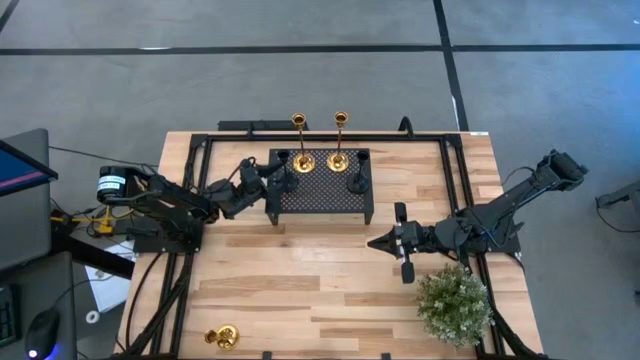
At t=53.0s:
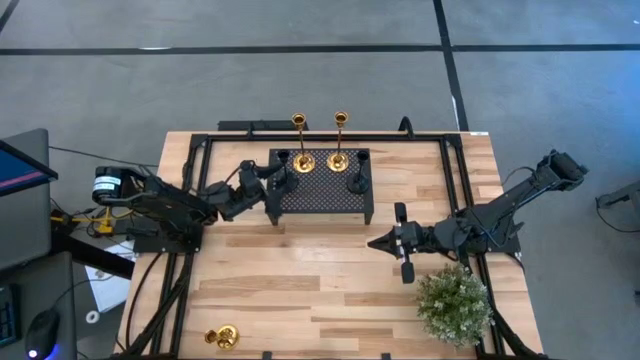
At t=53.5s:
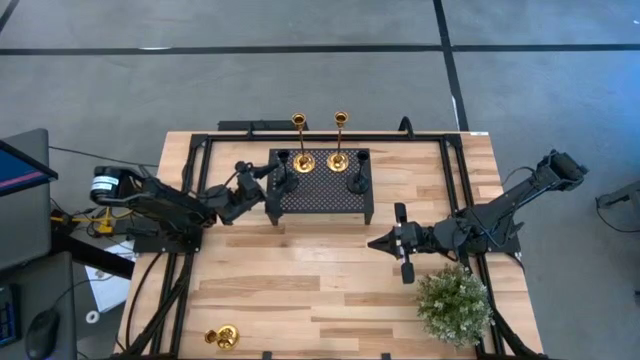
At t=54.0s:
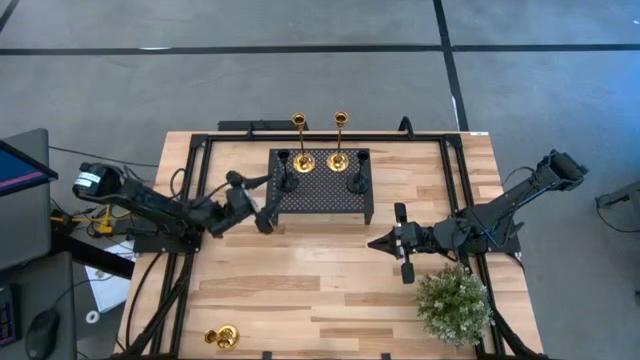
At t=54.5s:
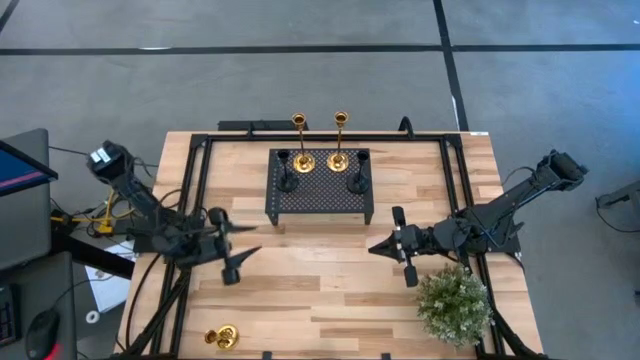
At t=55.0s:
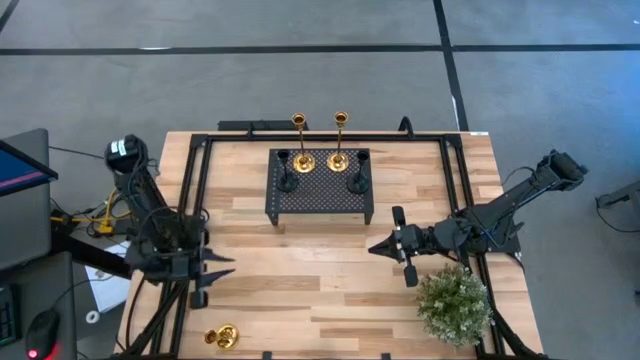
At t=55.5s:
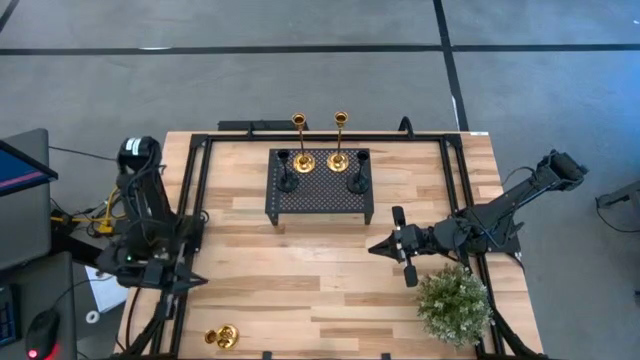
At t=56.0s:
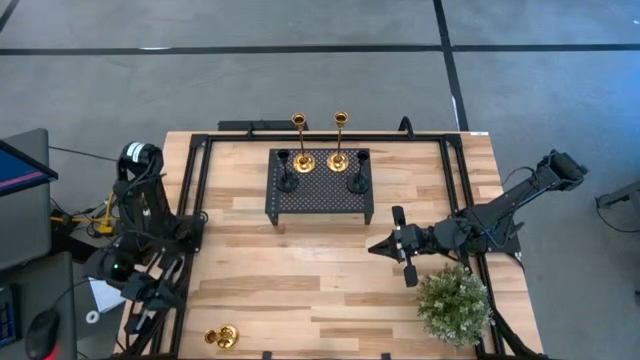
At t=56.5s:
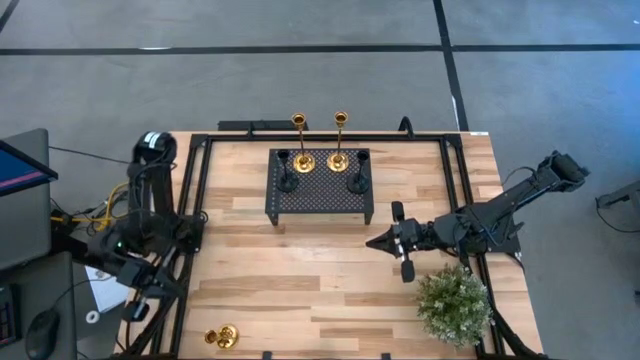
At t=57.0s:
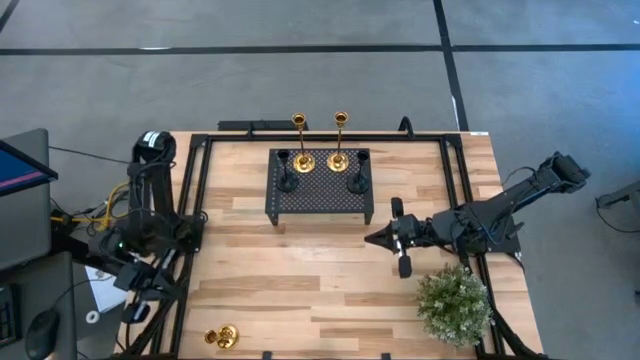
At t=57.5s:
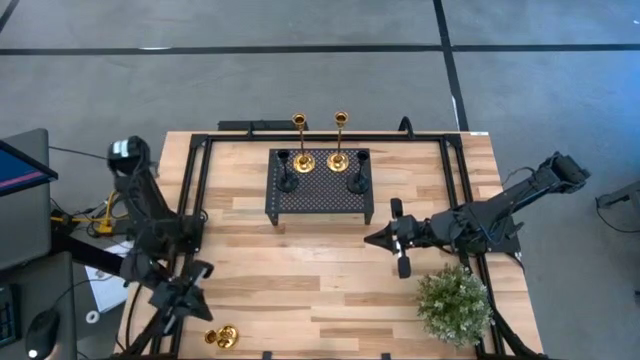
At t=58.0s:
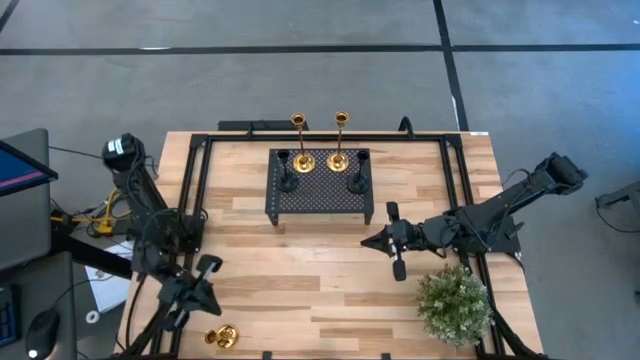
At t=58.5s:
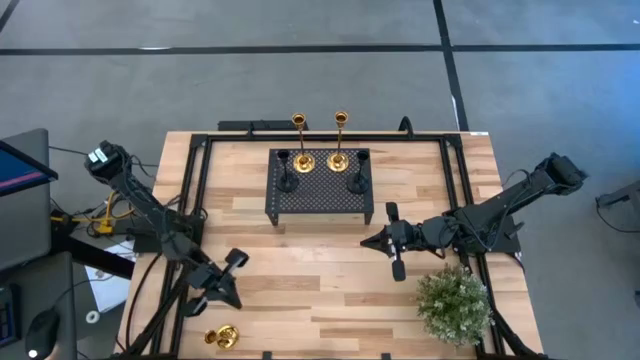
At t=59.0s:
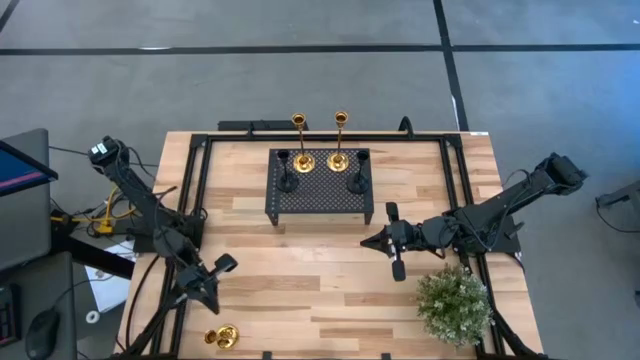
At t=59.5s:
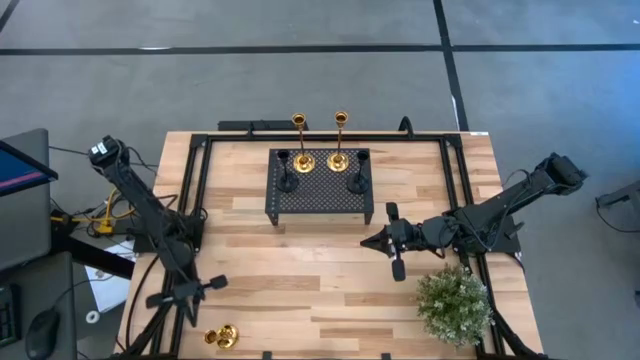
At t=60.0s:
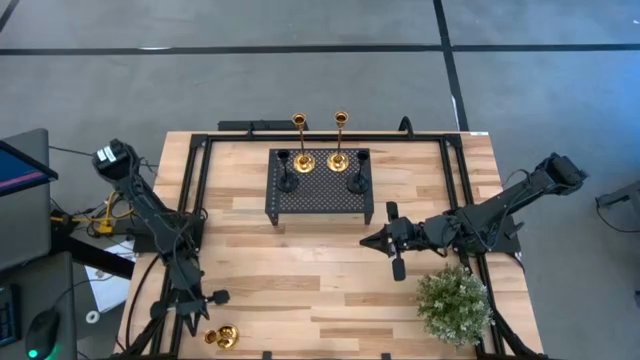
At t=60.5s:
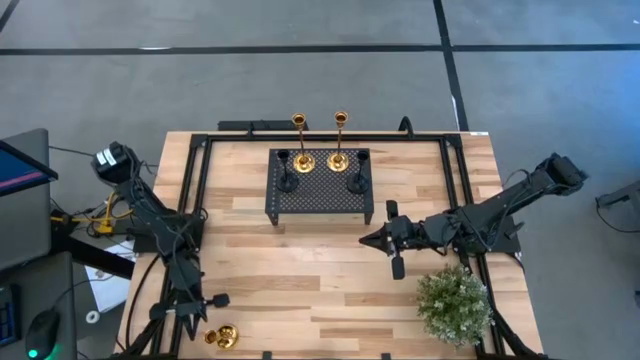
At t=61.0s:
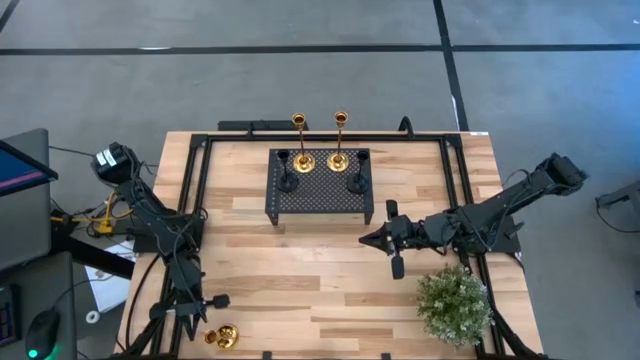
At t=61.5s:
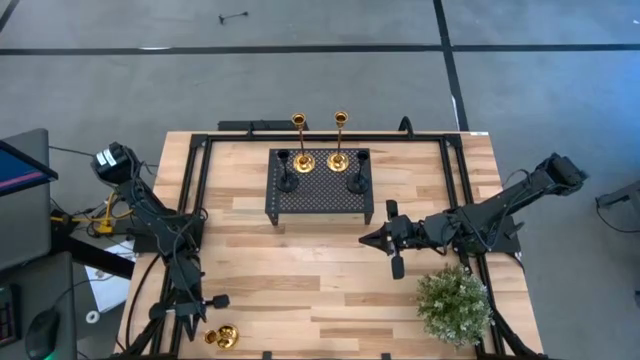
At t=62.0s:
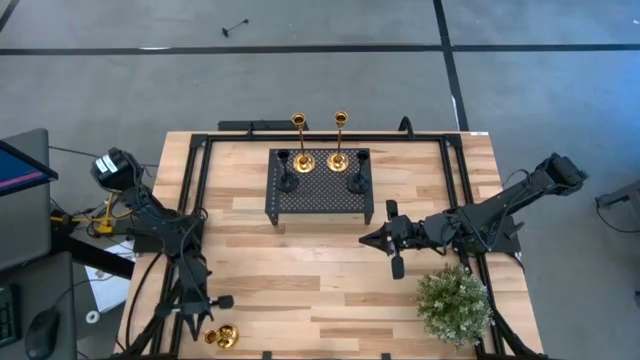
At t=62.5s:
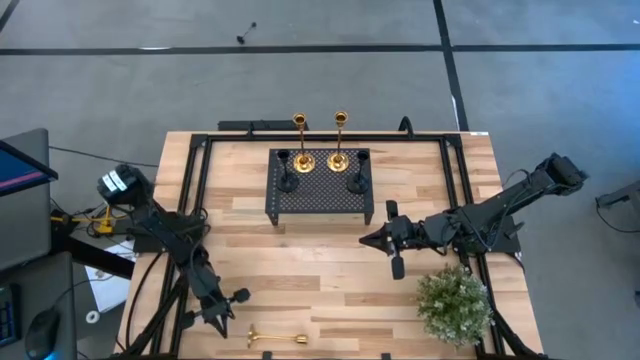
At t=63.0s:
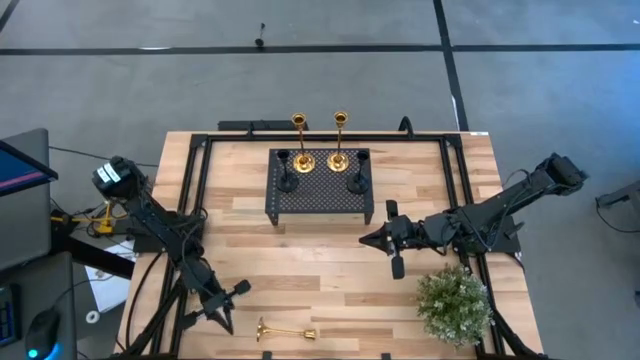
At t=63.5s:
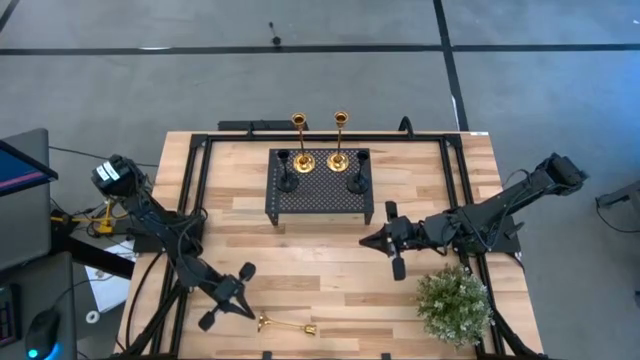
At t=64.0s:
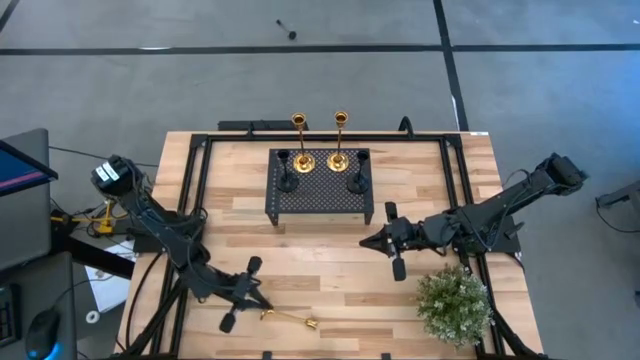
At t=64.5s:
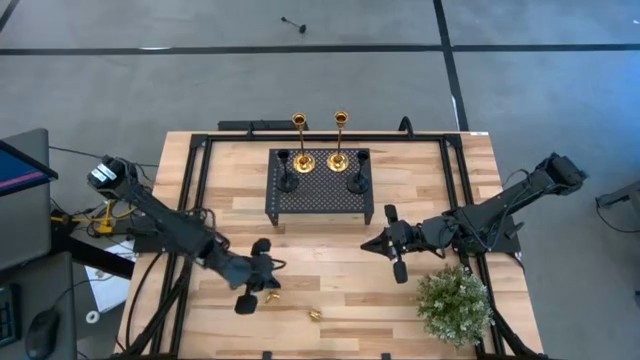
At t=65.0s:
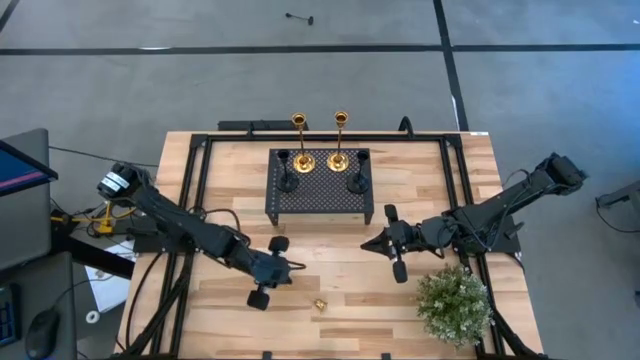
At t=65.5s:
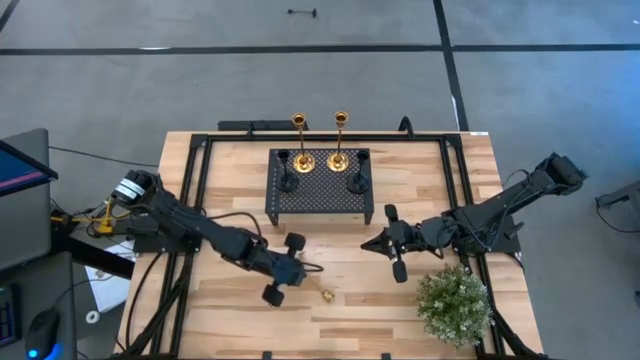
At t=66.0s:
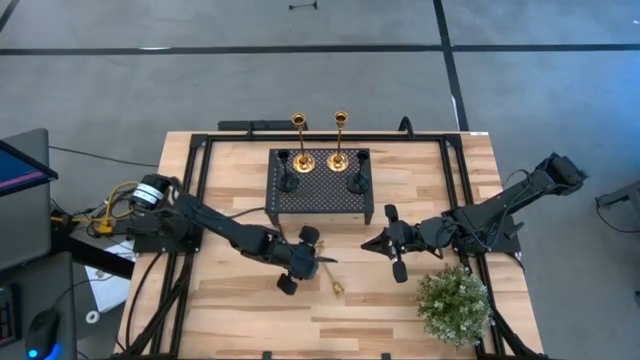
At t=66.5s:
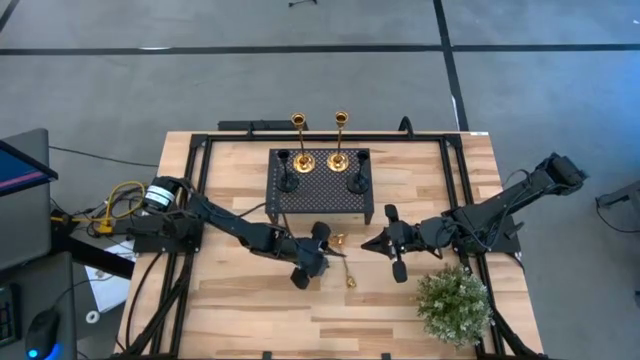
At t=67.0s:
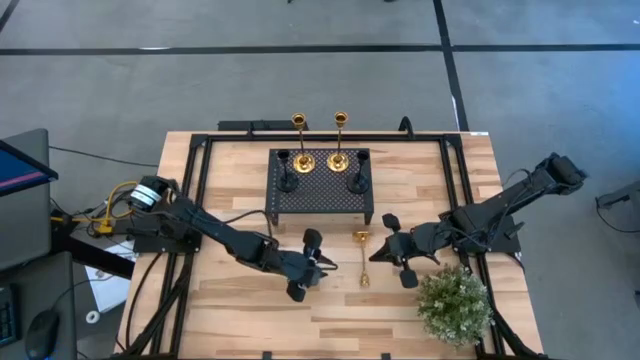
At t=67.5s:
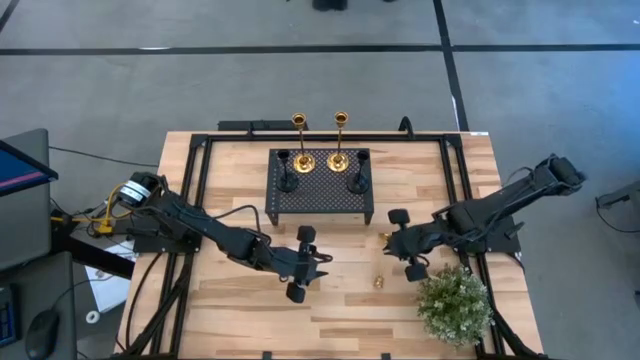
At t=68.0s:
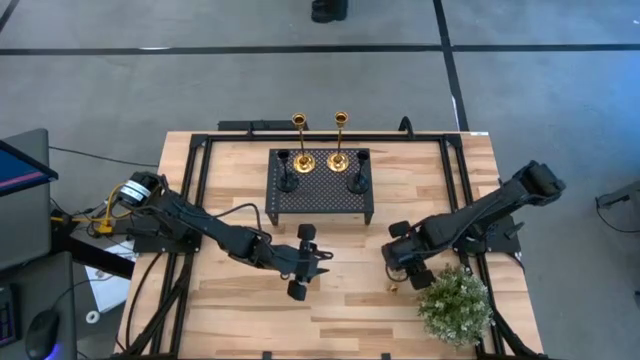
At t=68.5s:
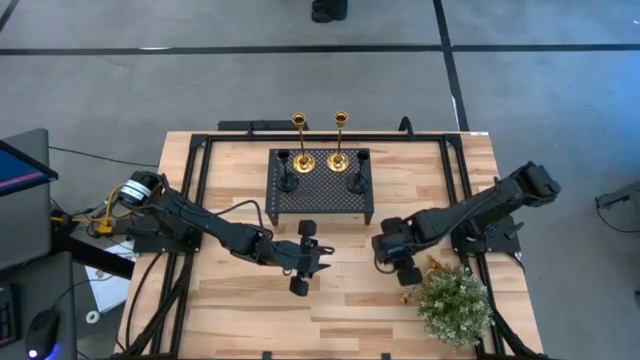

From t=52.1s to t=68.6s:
Task: Pick & Place candle stick holders
Put the gold candle holder on the shelf

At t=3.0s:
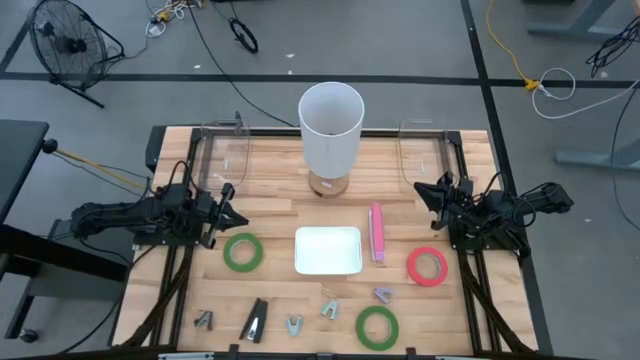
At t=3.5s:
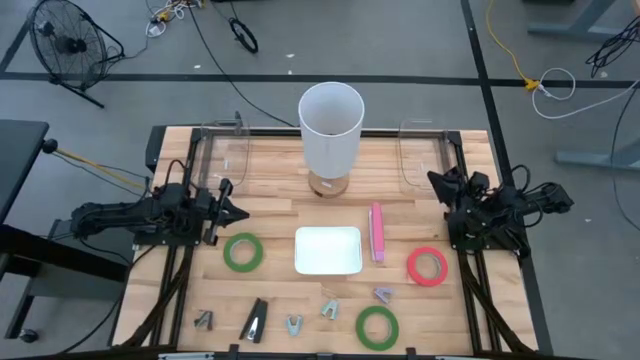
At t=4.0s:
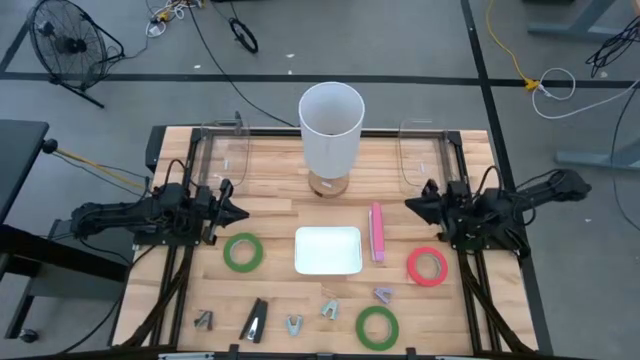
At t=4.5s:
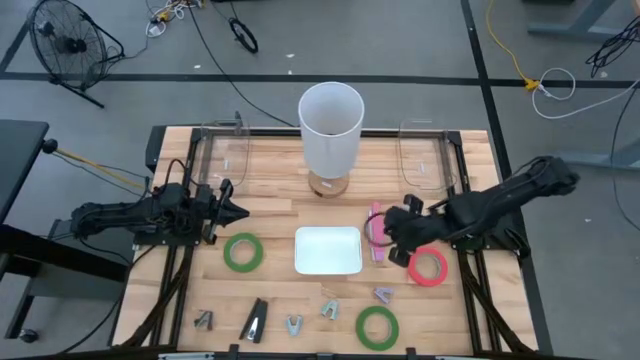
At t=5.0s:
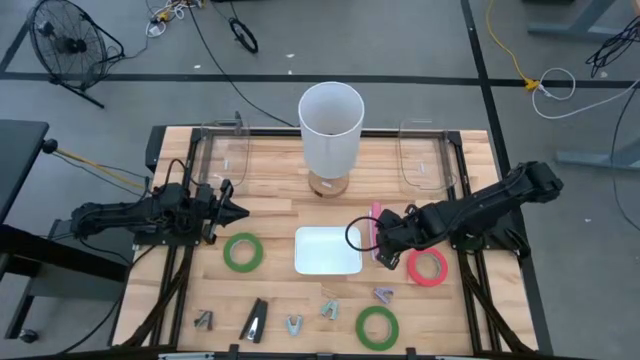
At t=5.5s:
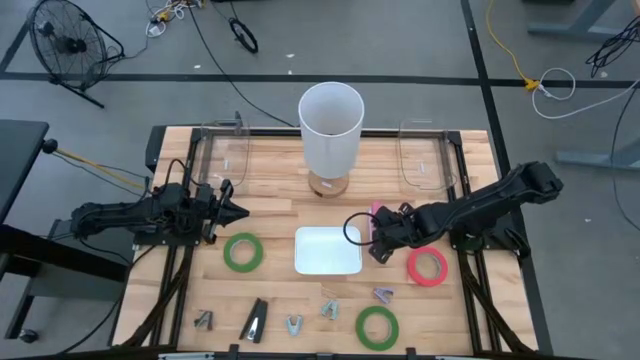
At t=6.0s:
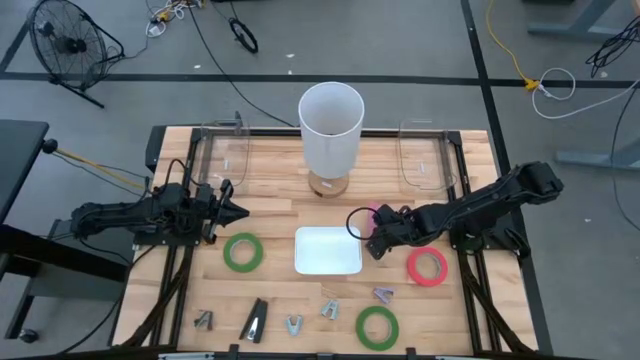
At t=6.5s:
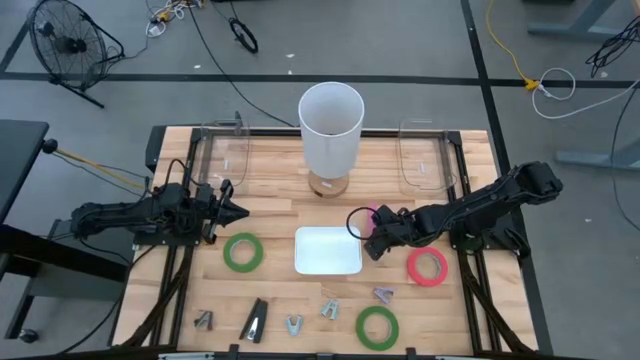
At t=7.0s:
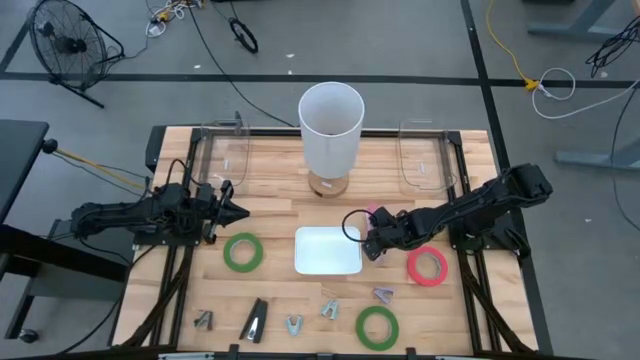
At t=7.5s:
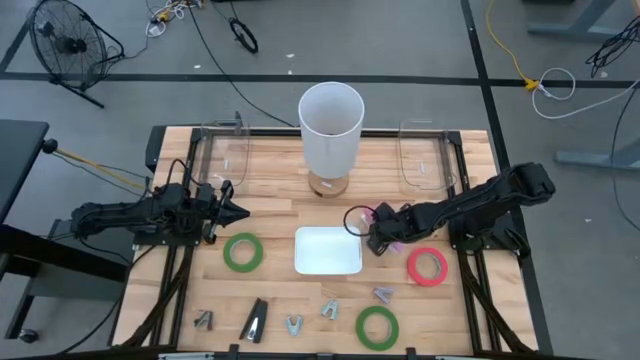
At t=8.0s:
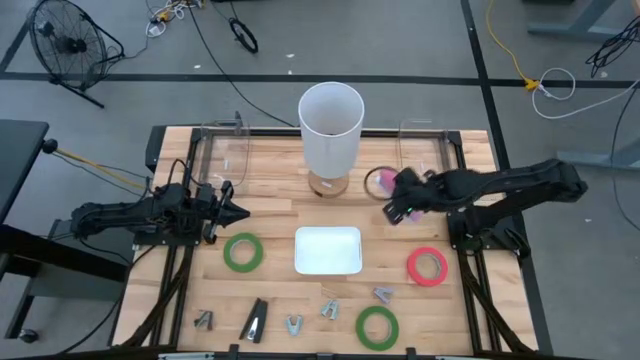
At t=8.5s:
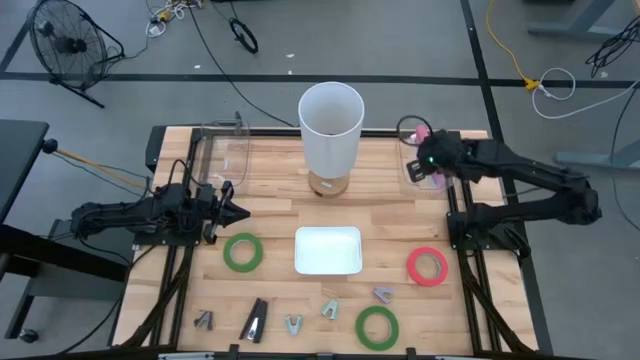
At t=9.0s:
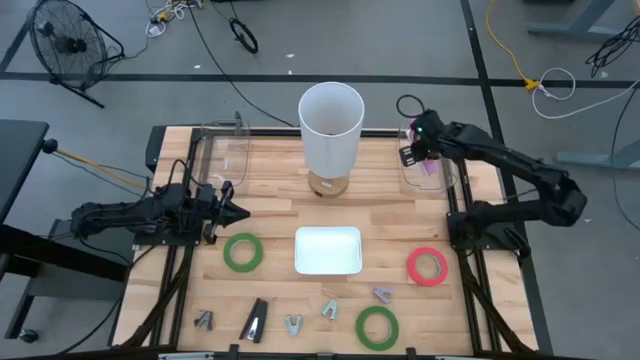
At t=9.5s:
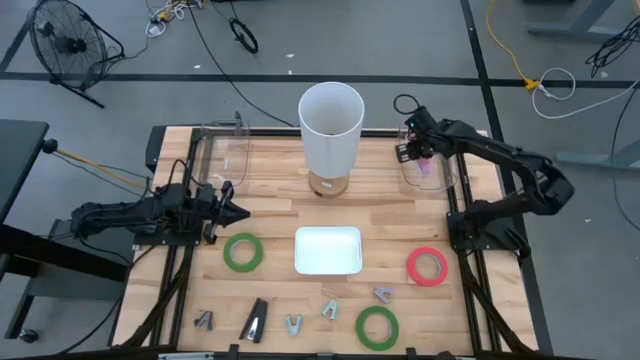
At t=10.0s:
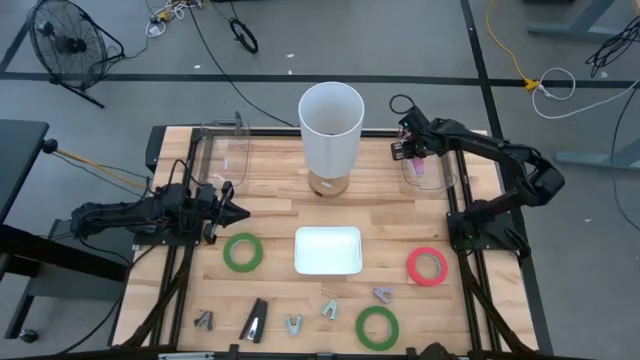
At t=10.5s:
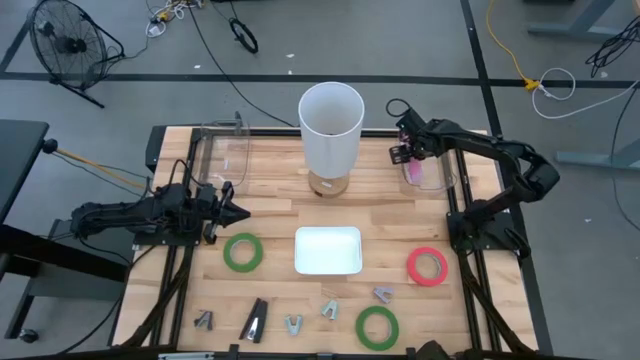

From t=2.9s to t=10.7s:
Task: Pick and place Stapler, Stapler remover, tape
Put the pink stapler into the right transparent bin
